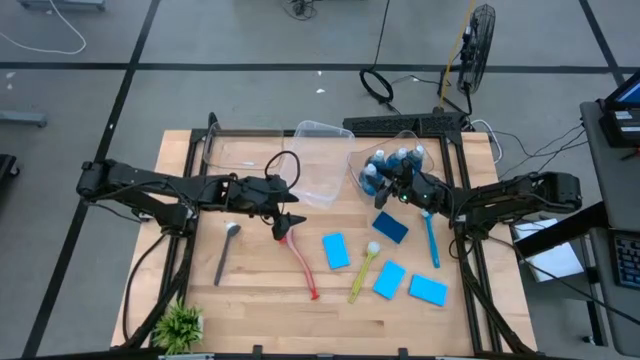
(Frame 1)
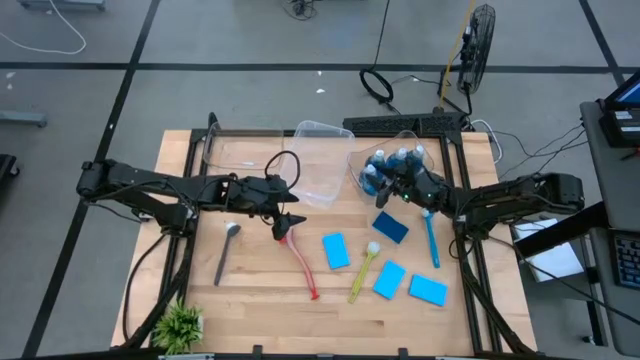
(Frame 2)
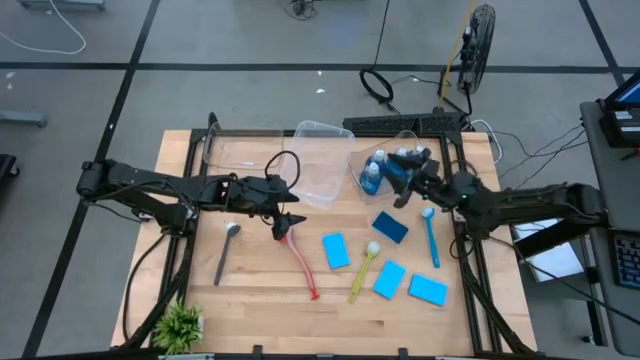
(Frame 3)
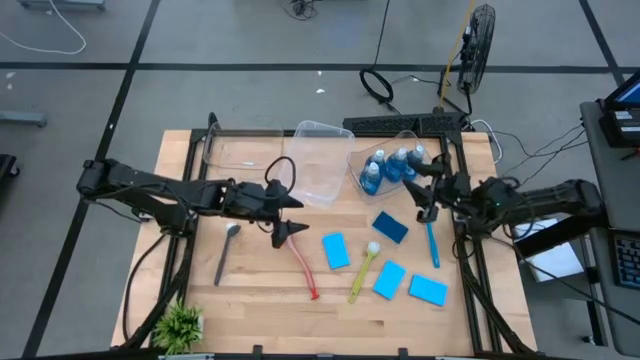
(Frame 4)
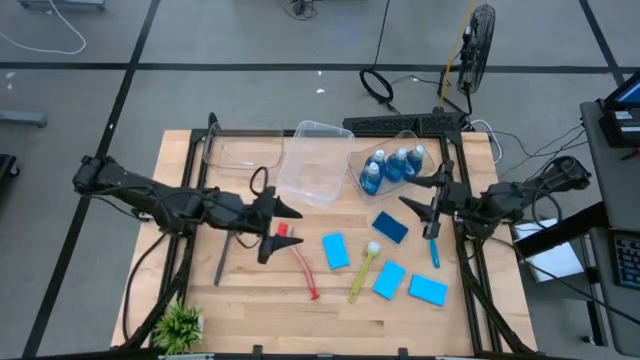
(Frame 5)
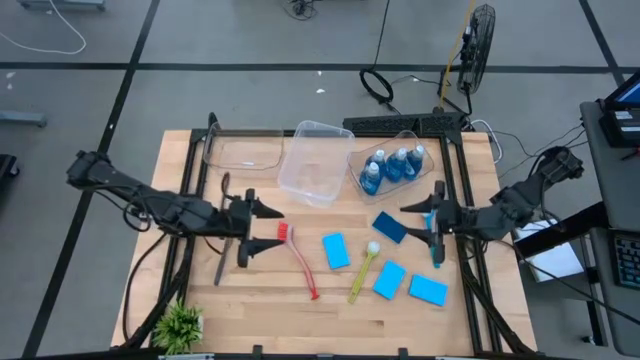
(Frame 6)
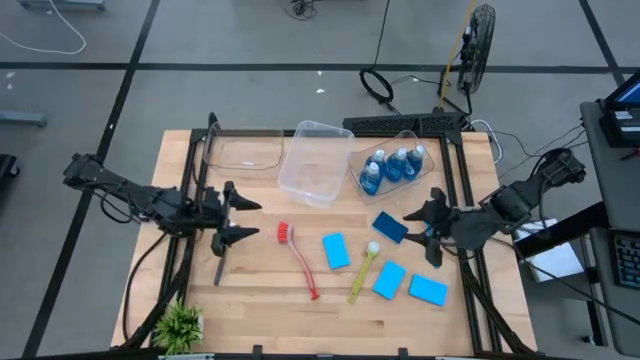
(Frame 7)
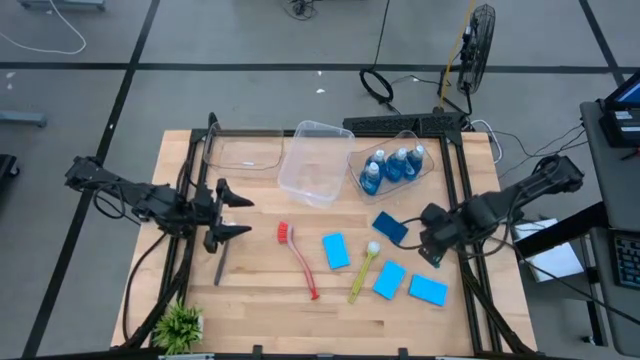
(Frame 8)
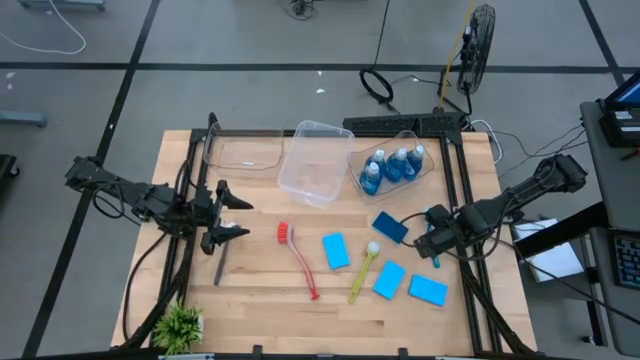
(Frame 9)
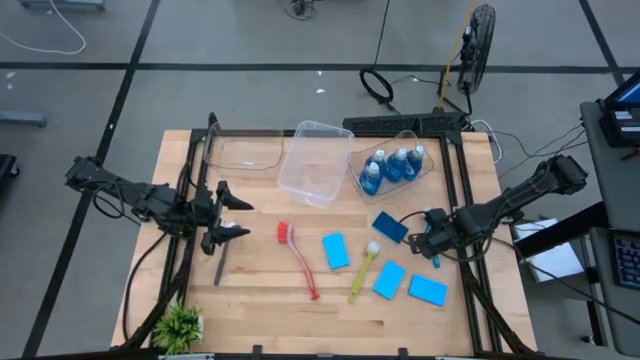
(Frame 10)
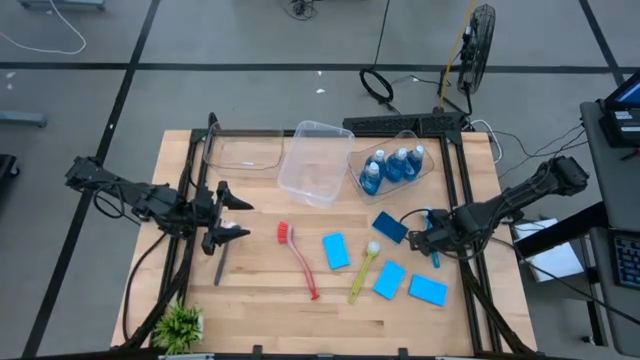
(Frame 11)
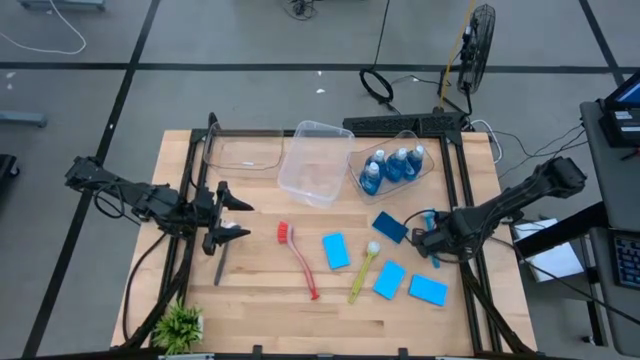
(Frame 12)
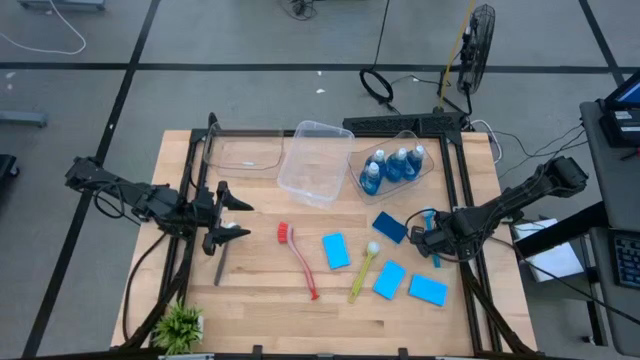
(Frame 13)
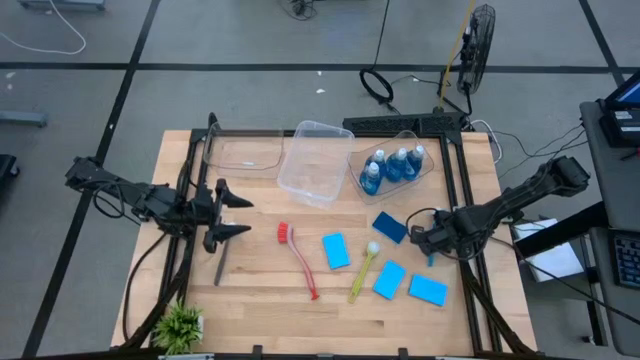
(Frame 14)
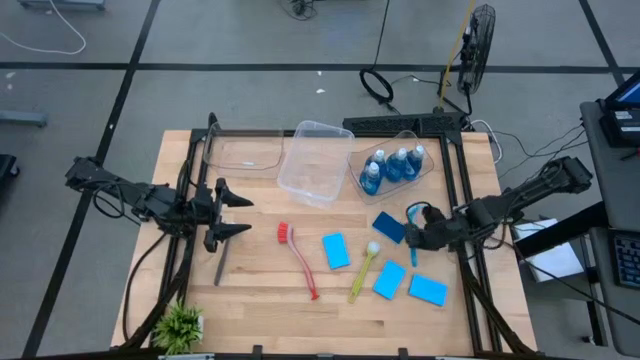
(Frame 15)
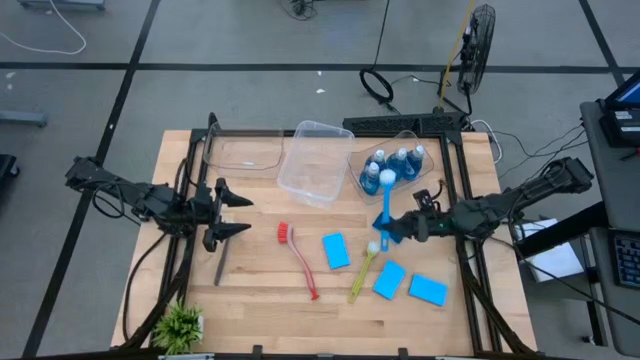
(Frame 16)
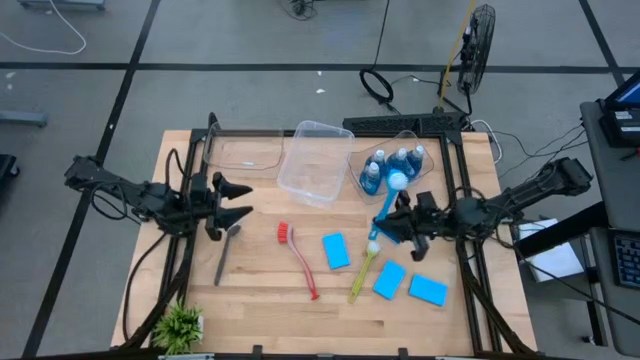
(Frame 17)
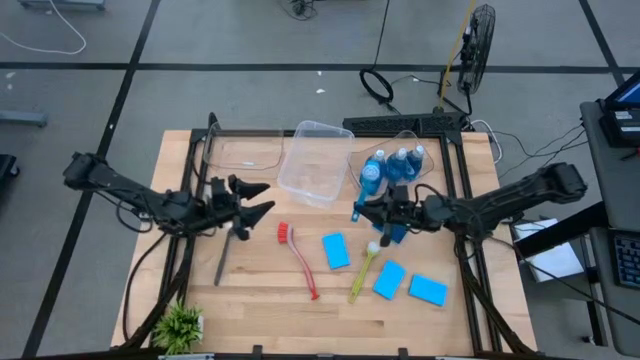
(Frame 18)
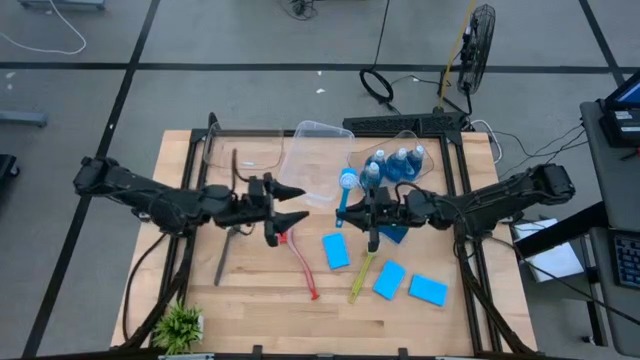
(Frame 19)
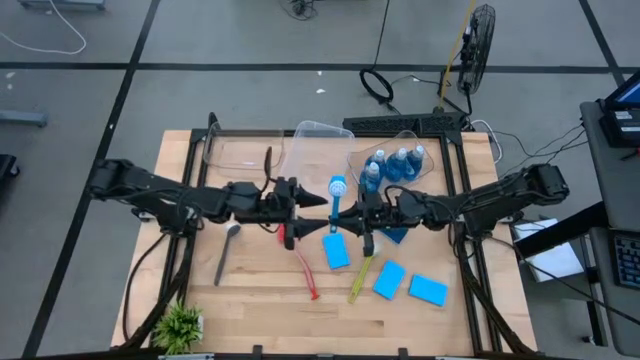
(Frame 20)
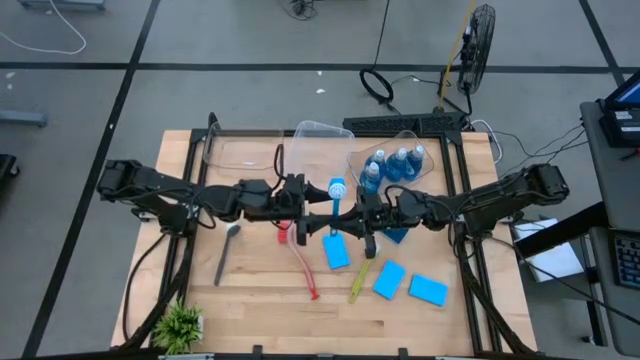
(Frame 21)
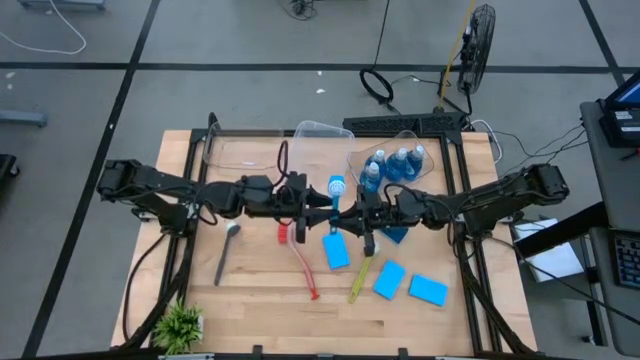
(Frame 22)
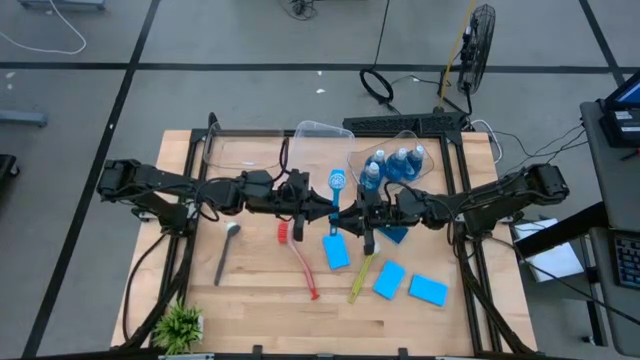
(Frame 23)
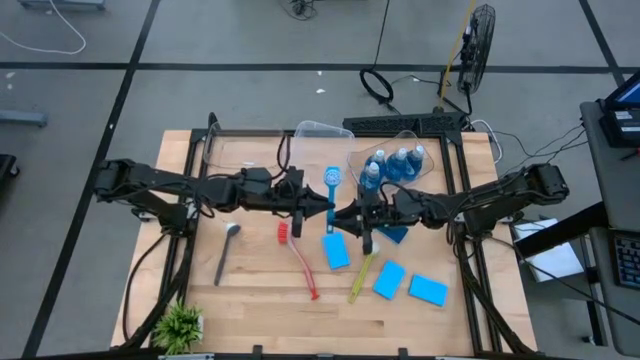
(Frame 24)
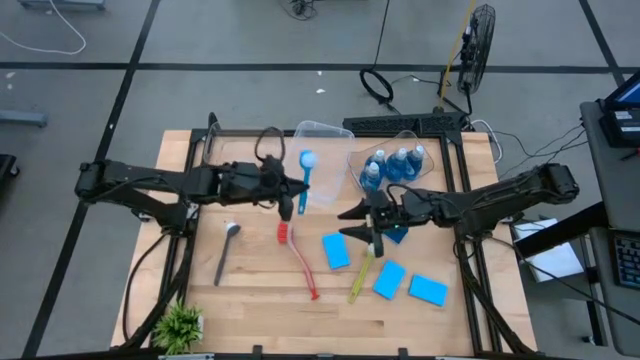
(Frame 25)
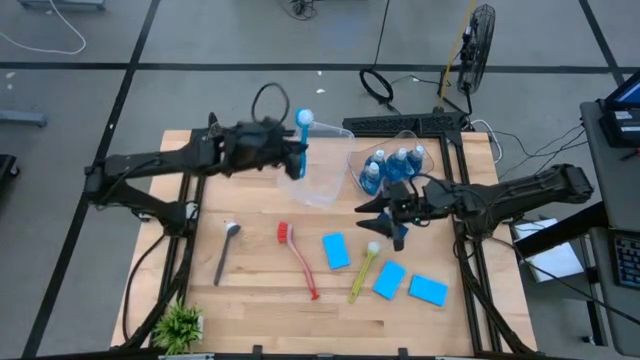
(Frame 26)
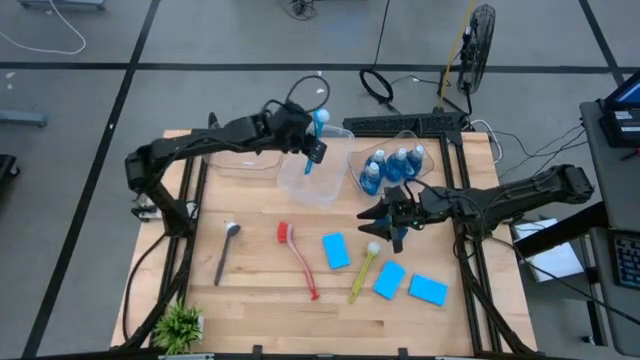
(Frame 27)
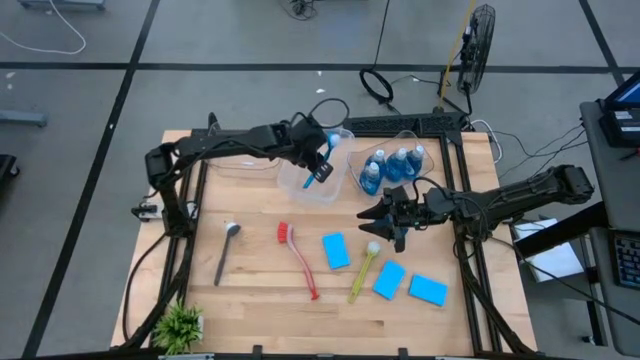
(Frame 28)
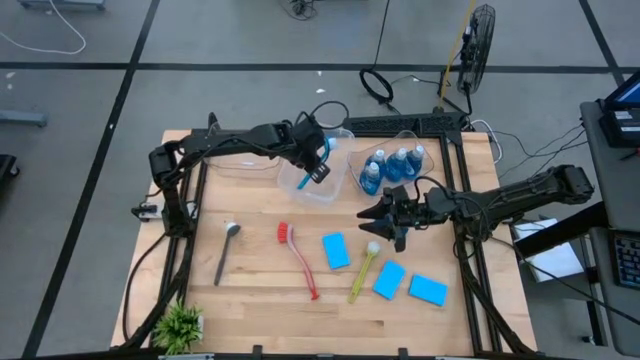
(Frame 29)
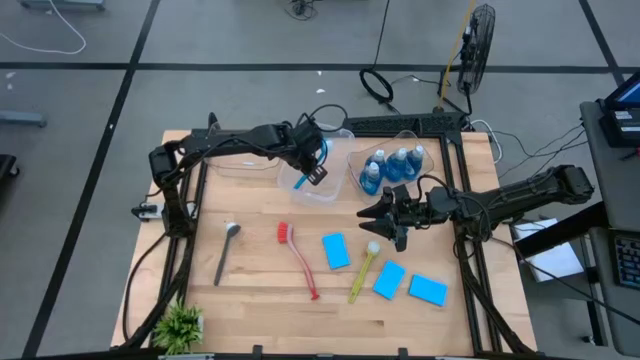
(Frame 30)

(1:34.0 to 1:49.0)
Task: Pick & Place Kitchen Sink Supplies
Put the blue dish brush into the transparent container

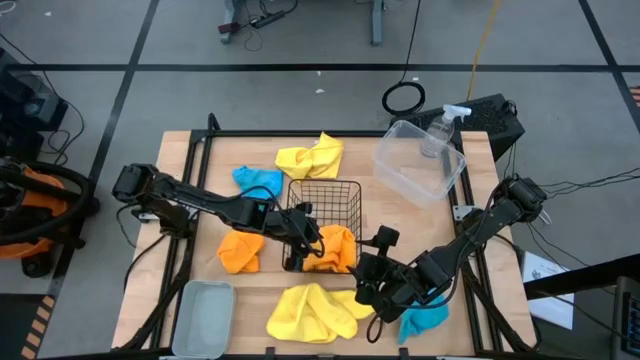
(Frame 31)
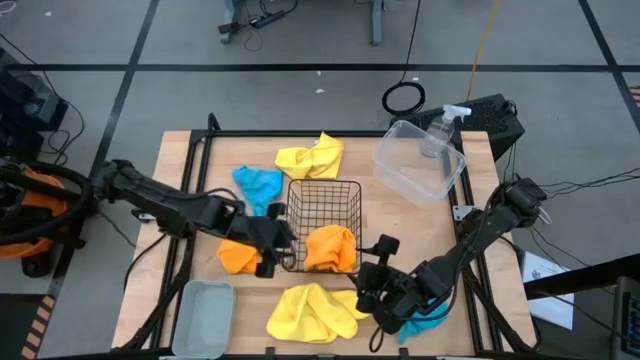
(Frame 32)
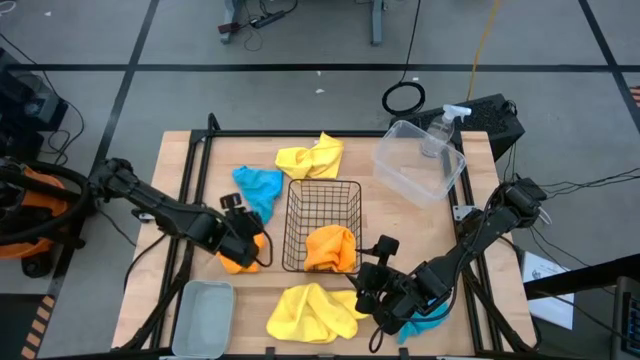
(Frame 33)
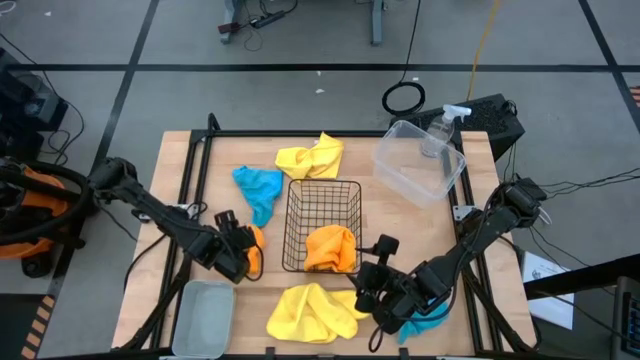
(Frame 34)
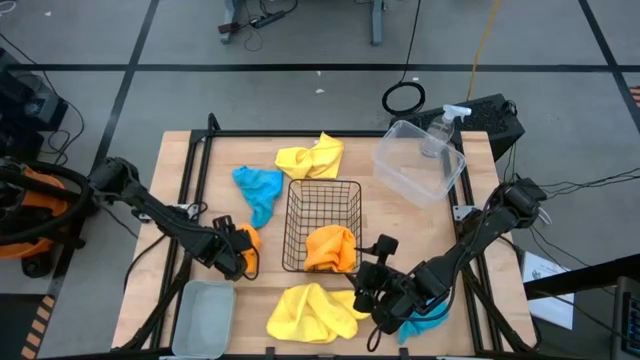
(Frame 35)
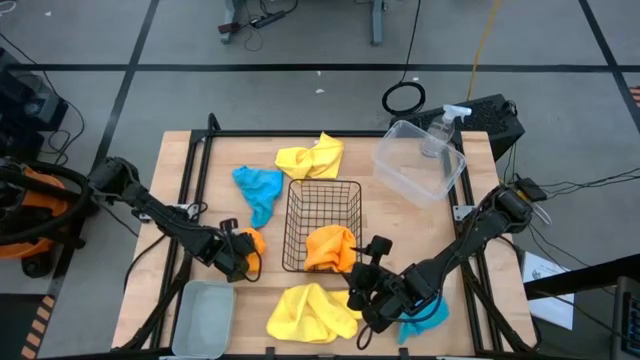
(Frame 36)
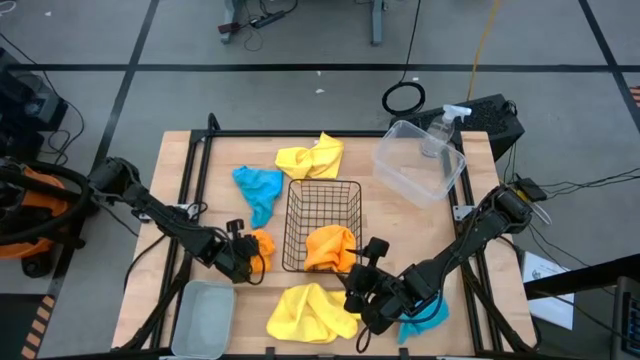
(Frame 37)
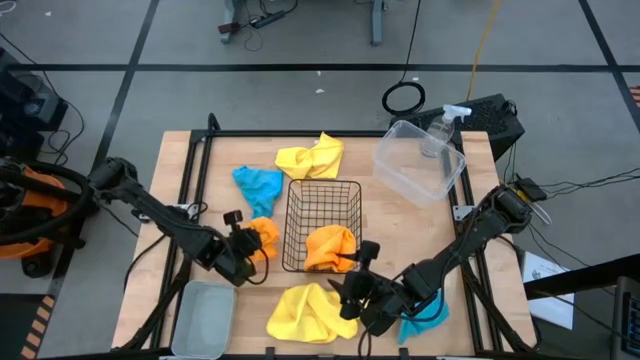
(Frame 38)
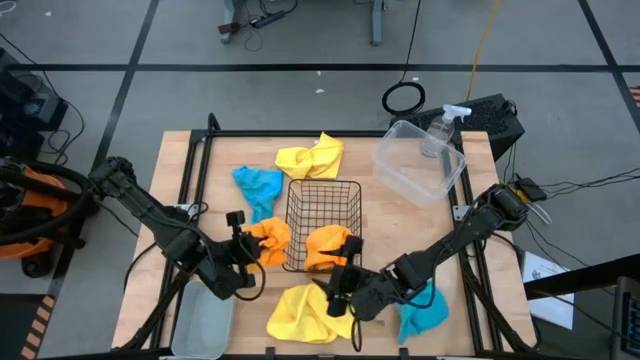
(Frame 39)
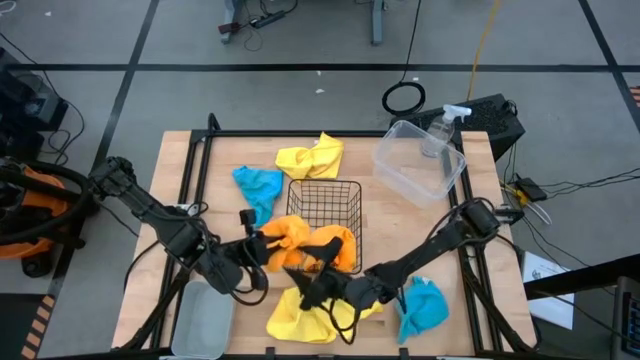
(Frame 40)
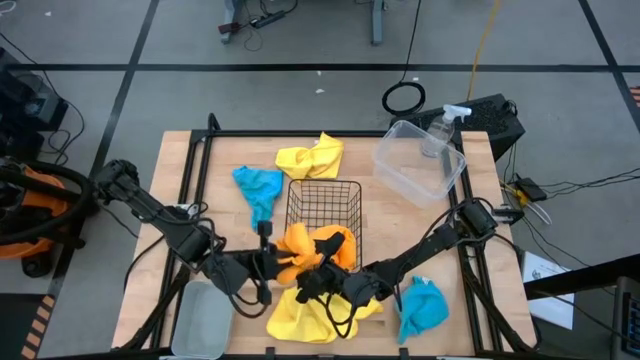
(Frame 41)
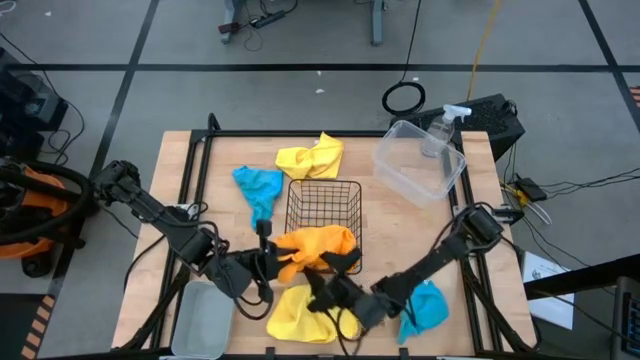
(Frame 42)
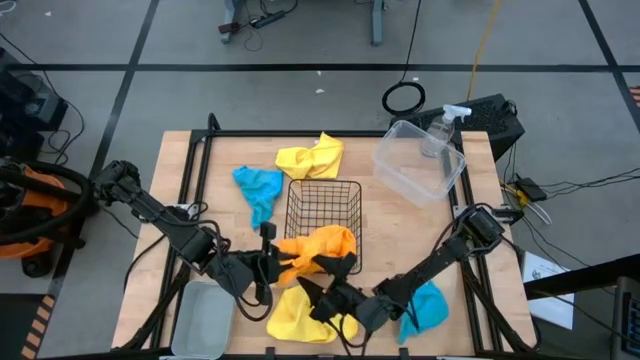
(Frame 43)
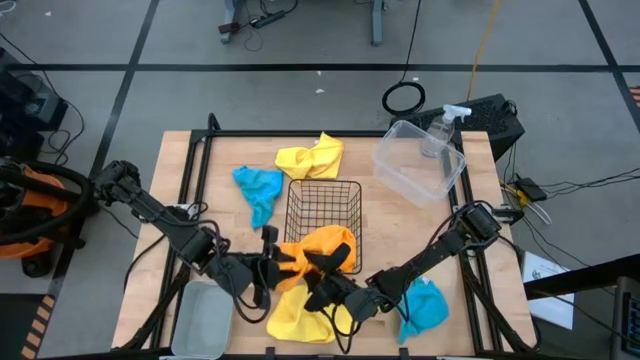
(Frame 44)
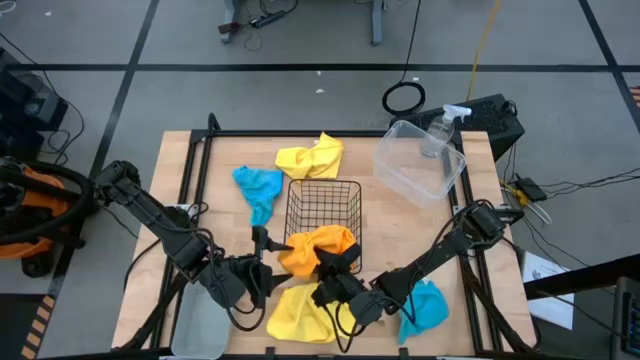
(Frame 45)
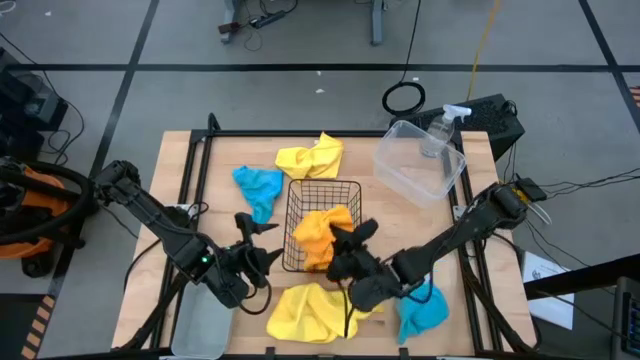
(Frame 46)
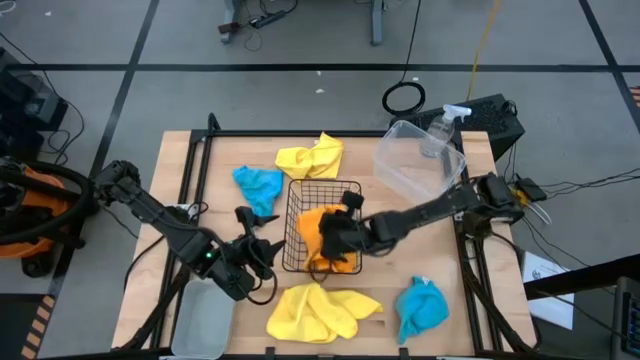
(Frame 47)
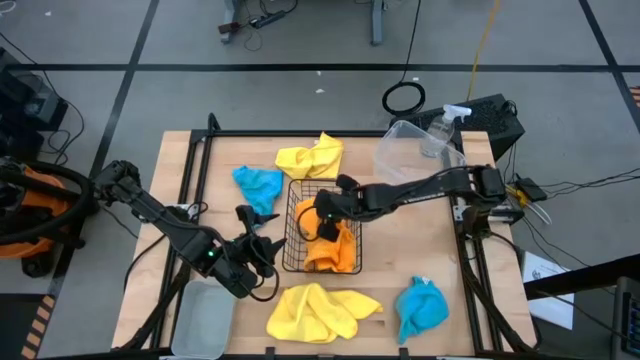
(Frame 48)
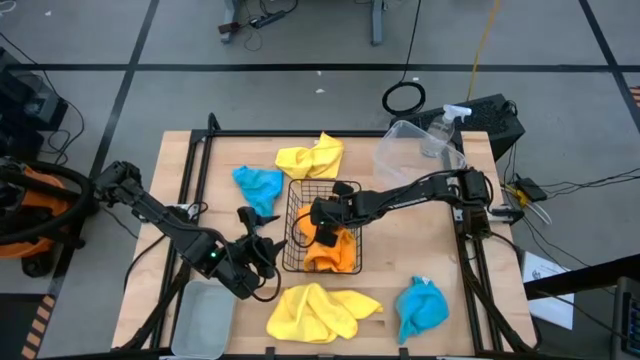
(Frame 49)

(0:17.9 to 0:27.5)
Task: Sort microfiber towel by color & place in baskets
Put the orange microfiber towel into the wire basket
